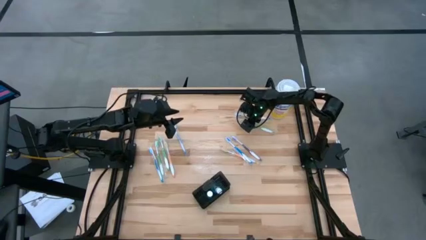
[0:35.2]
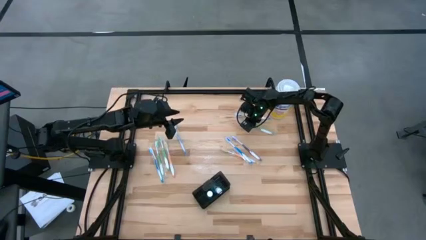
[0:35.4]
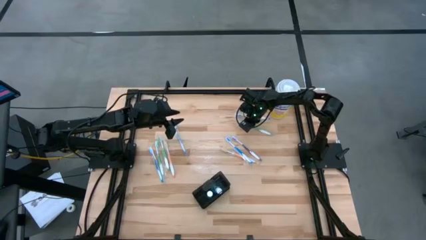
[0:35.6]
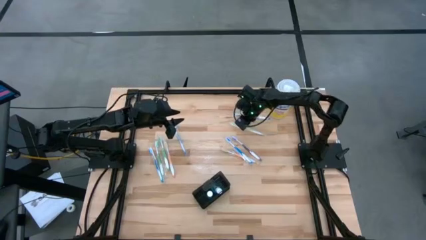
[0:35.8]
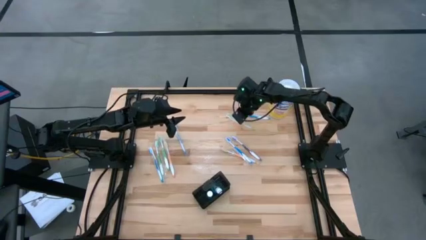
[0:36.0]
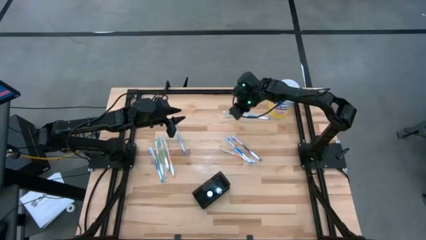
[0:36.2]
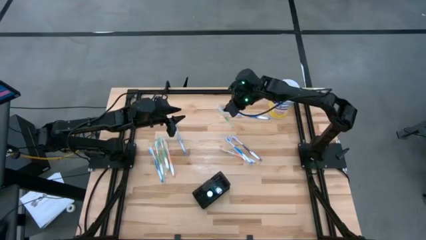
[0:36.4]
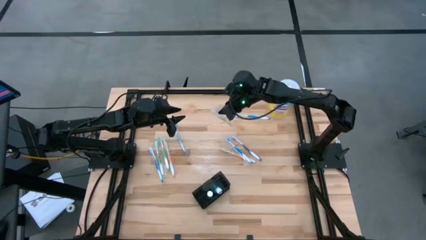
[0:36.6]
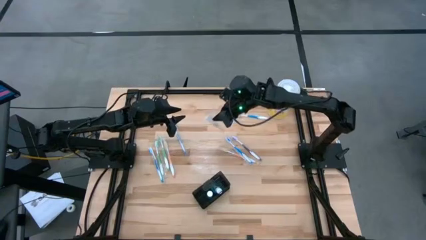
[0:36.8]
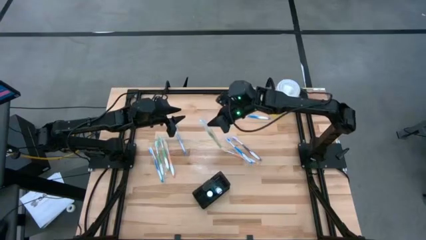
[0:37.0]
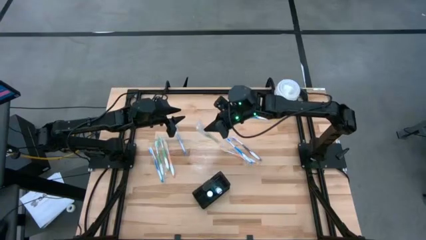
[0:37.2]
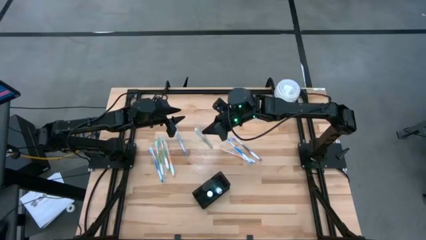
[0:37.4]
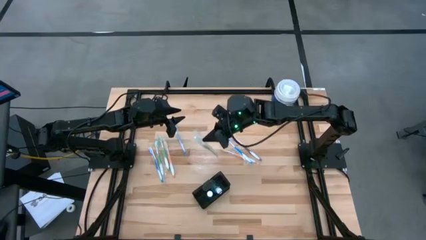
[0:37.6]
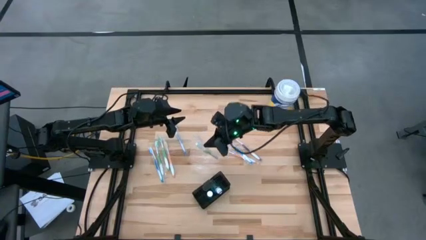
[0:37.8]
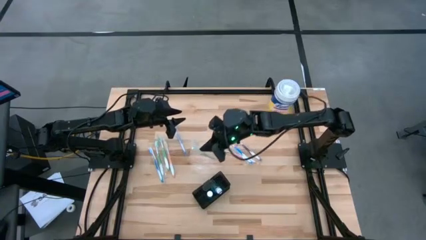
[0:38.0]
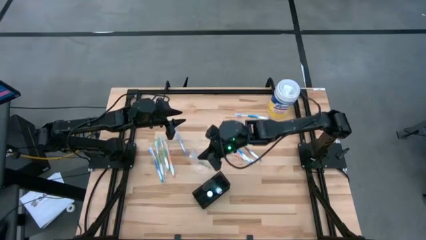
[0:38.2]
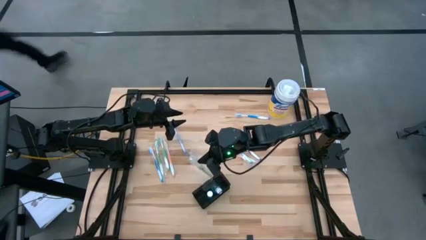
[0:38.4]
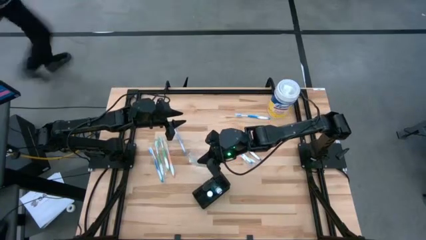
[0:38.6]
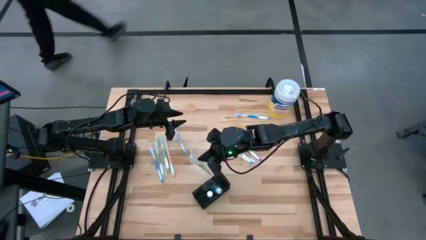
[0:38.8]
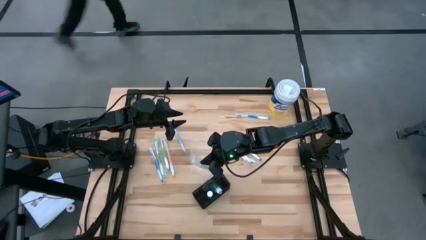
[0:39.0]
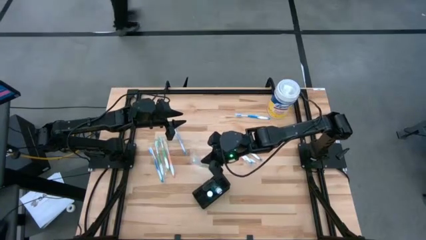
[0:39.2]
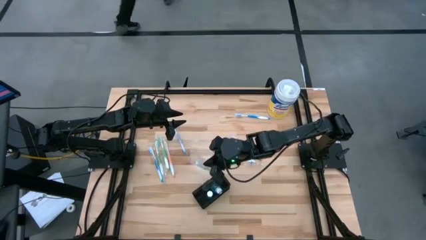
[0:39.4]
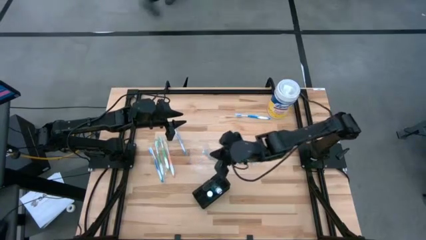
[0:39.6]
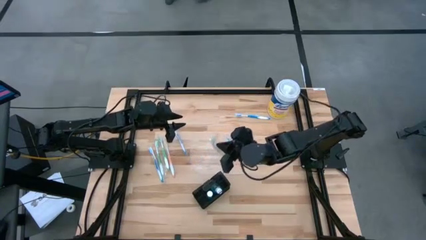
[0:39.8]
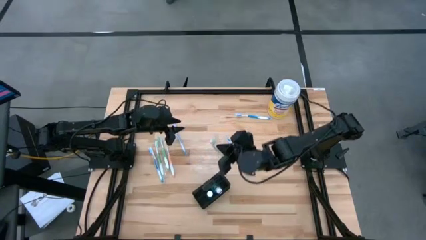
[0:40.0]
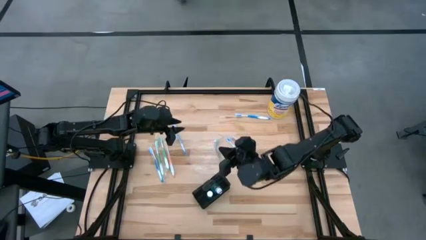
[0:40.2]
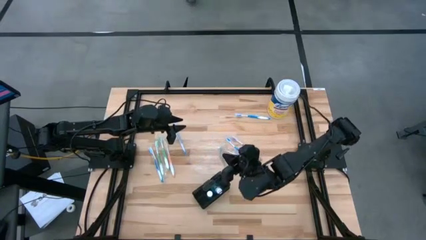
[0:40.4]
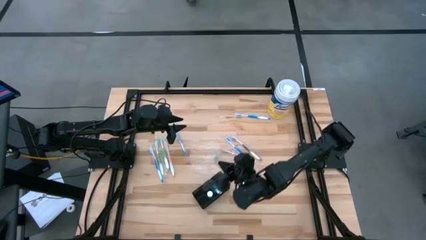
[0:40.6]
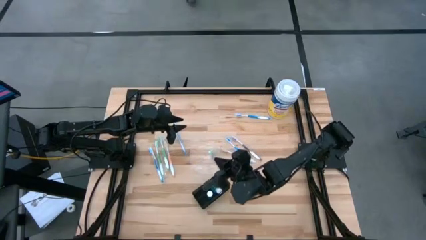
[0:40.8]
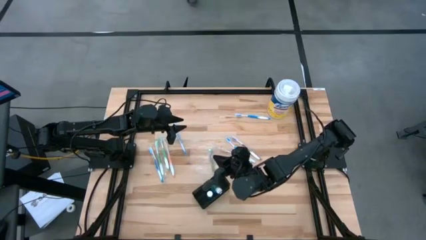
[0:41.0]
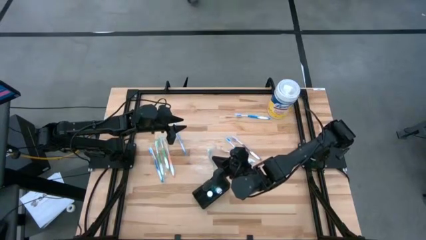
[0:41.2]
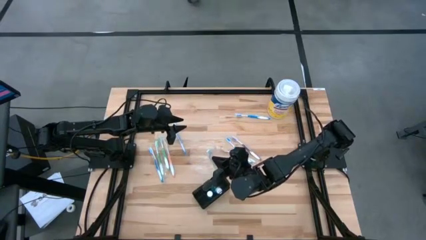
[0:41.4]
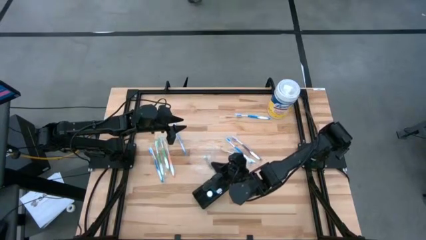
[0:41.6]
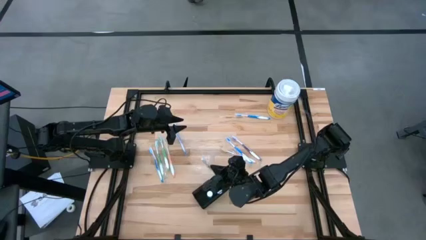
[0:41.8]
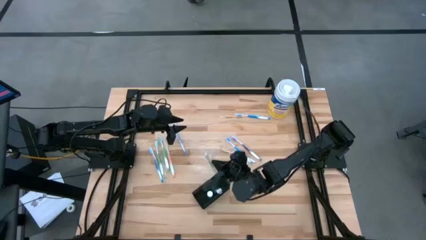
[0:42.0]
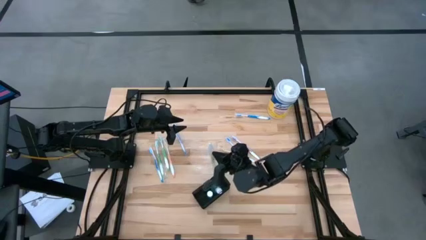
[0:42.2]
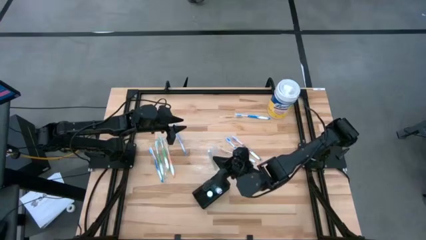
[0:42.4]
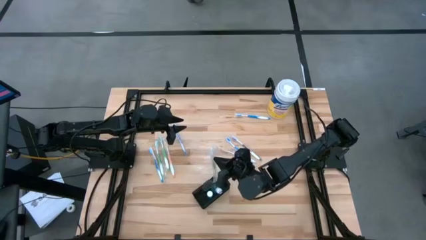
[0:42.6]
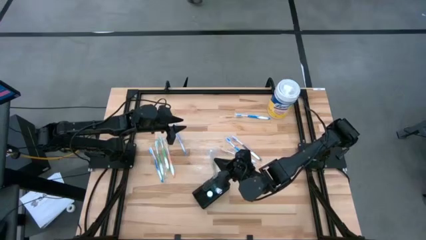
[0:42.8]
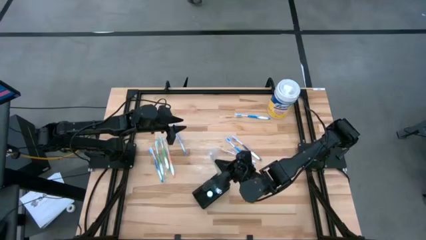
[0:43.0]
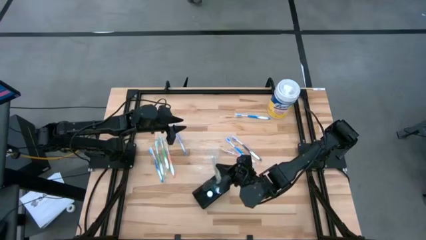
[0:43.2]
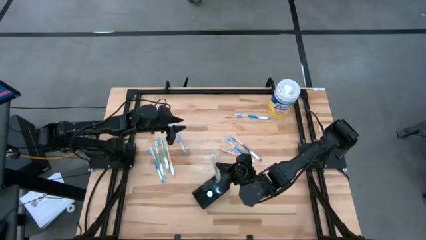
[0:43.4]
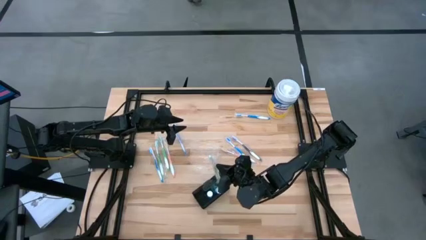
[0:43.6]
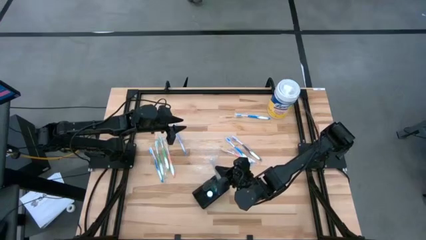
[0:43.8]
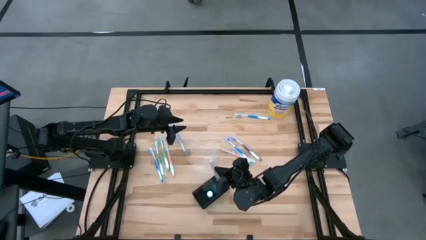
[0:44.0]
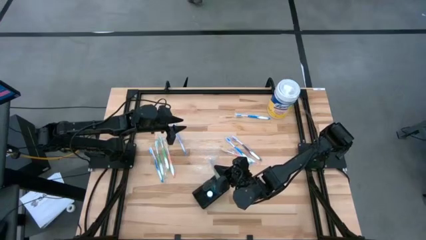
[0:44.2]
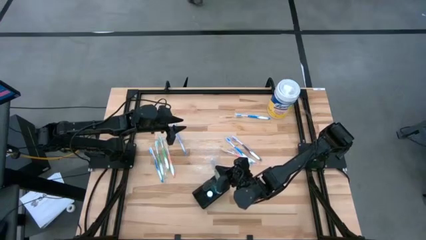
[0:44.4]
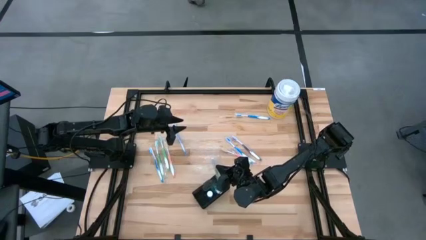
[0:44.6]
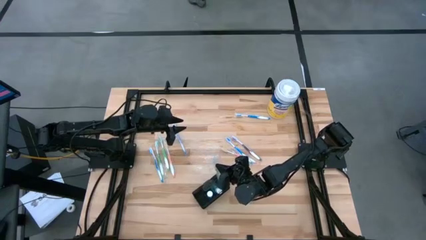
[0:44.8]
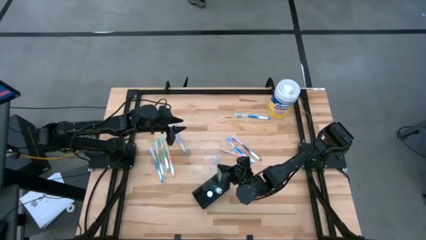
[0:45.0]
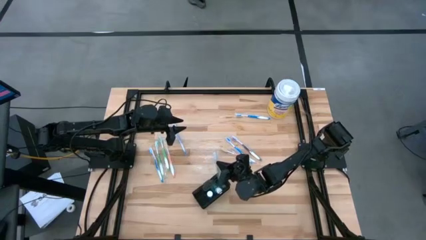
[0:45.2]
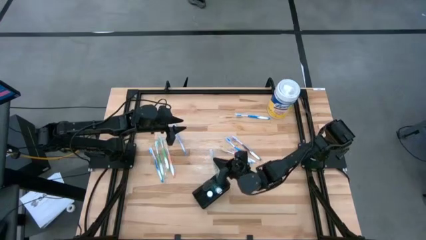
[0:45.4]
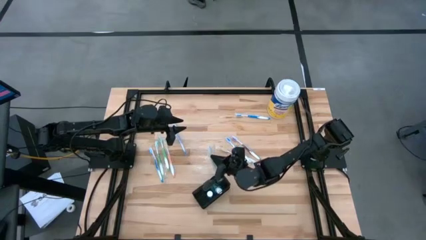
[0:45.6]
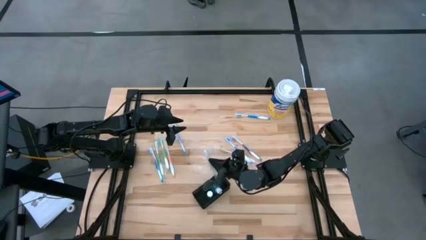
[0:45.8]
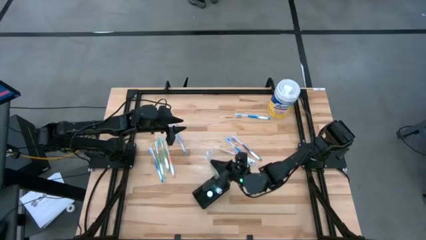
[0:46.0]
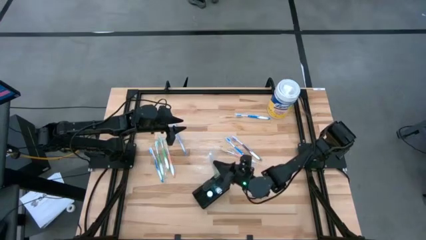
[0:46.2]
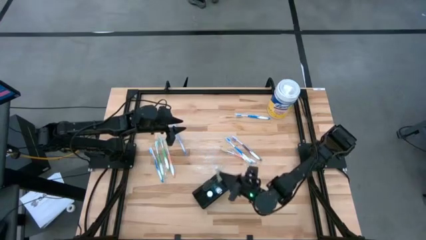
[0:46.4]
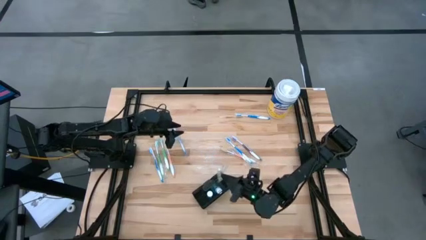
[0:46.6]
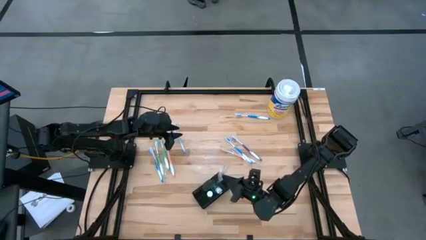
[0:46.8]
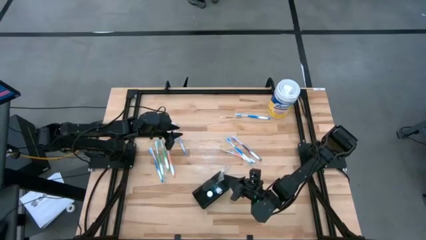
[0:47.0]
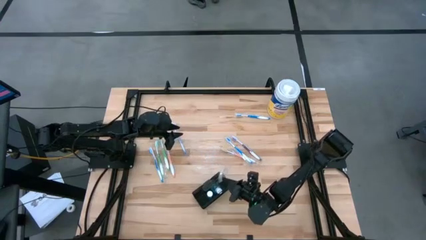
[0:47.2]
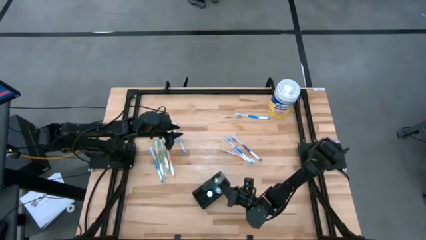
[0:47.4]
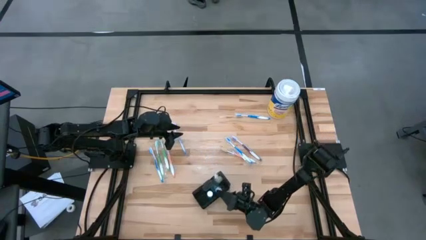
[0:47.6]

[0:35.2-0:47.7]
Task: Pick & Place toothbrushing station
Put the green toothbrush into the mesh organizer

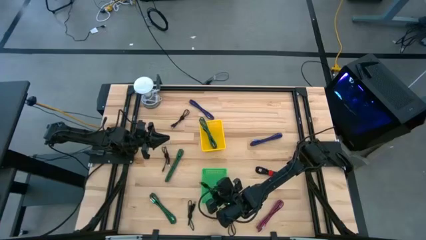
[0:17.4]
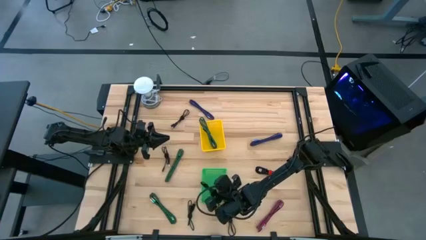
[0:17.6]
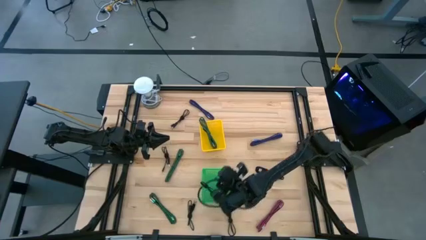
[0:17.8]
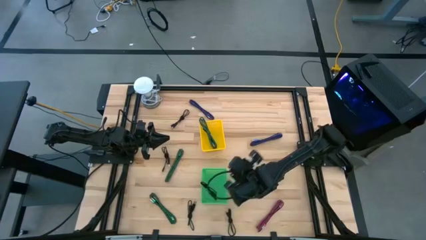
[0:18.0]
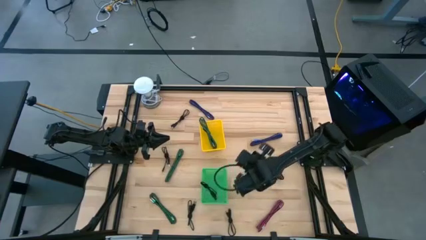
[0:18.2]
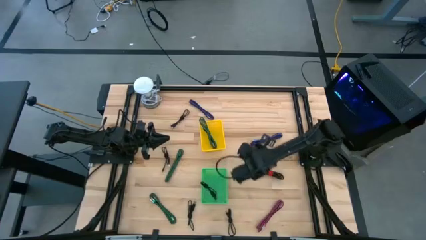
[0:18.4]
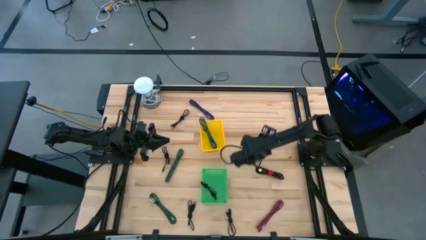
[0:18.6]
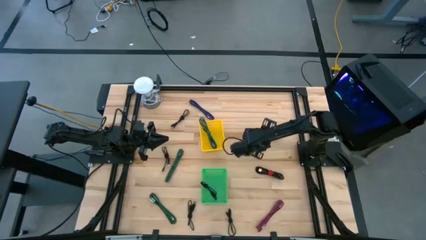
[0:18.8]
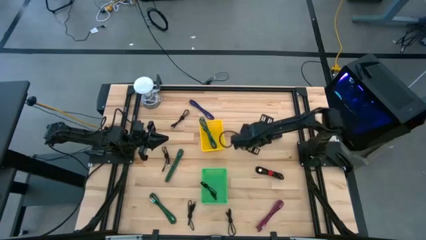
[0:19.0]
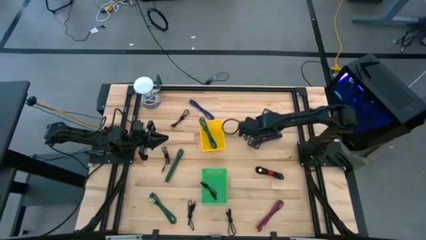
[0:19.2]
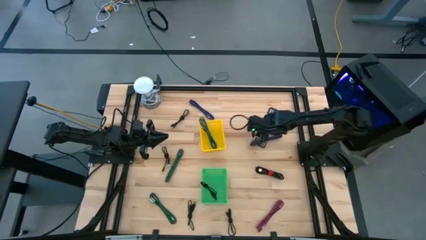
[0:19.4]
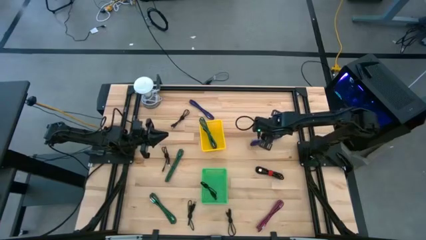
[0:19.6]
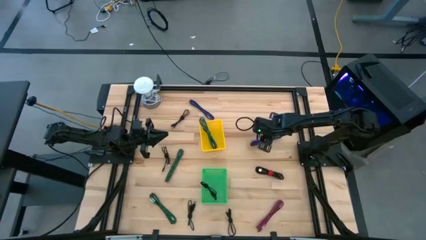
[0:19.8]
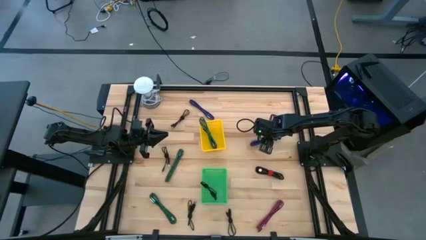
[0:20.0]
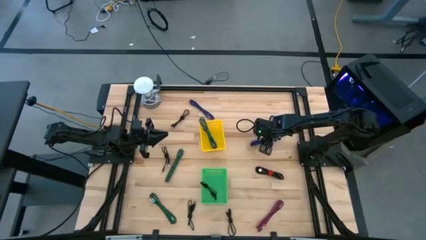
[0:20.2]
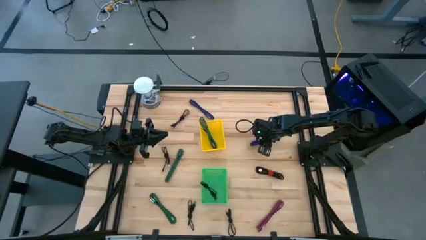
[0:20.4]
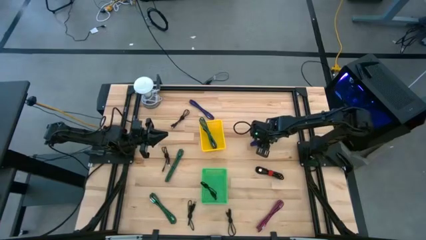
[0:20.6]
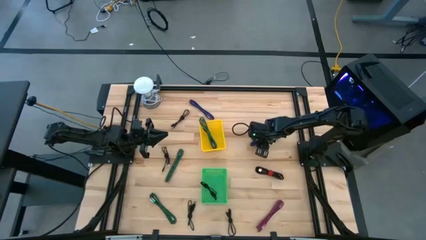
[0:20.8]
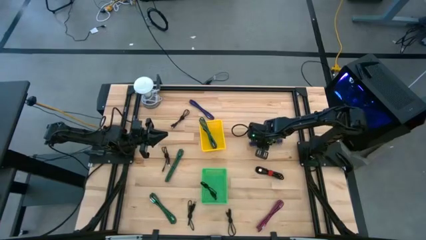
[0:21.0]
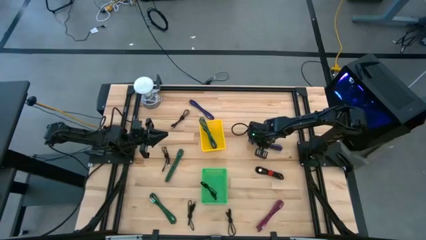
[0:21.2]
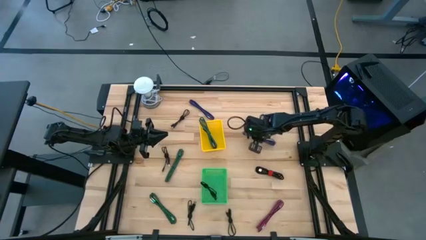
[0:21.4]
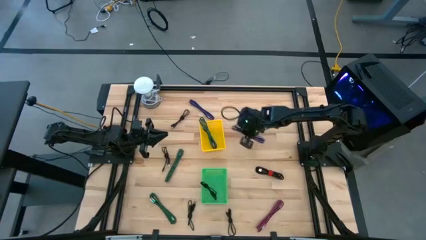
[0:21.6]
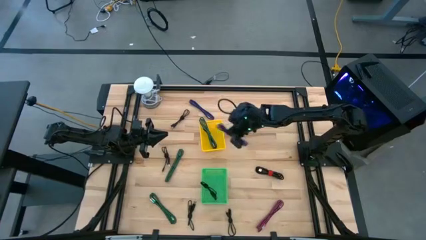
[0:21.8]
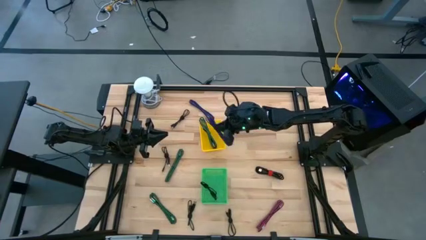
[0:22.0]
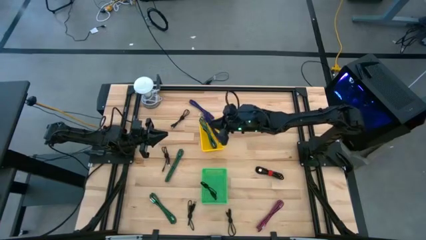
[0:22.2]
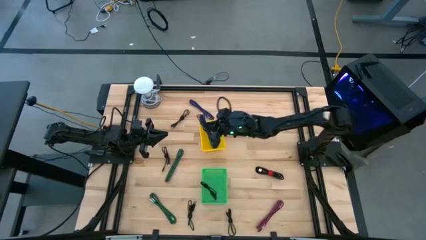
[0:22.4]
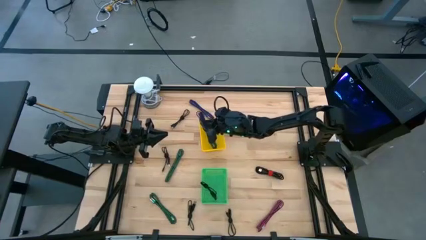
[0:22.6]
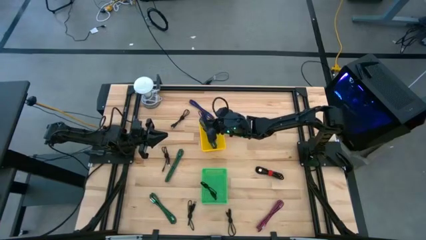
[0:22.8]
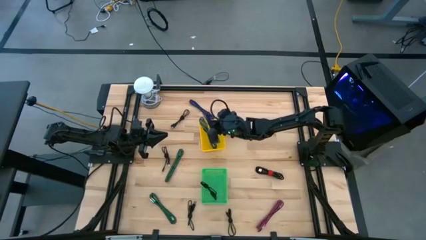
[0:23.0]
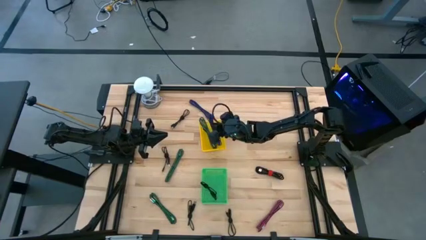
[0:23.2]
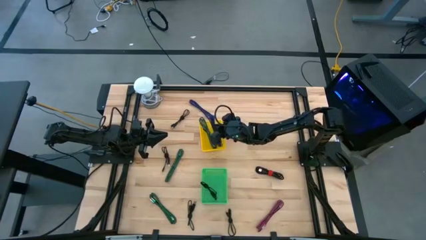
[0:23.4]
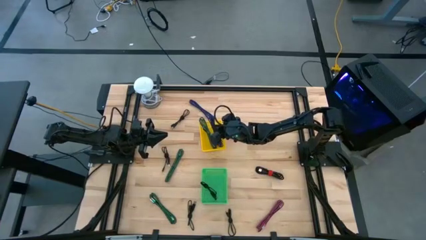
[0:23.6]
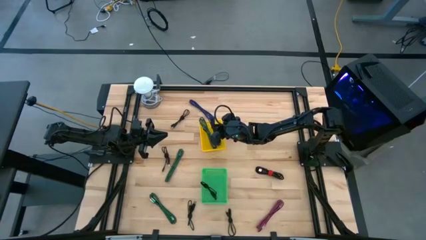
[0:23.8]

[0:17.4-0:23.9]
Task: Pick & Place USB Port
Put the black and blue charger cable into the yellow bin
